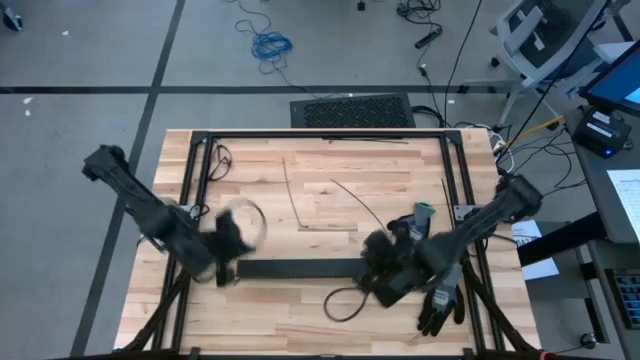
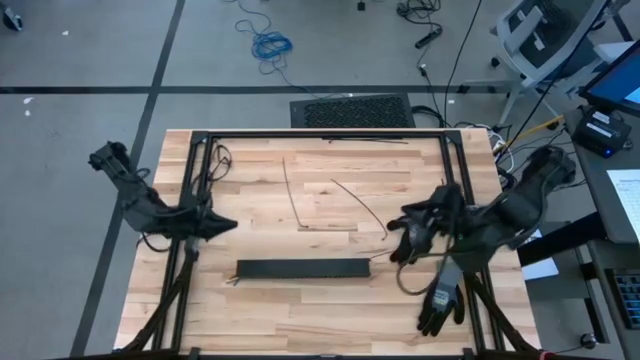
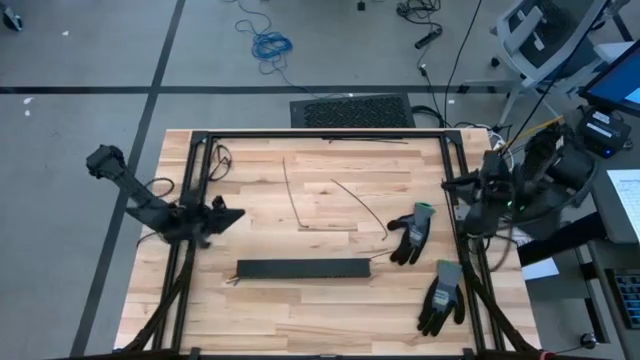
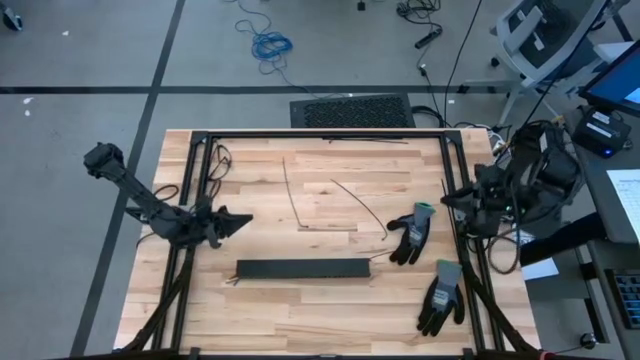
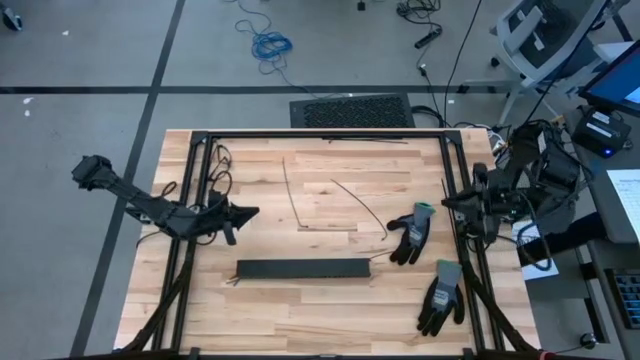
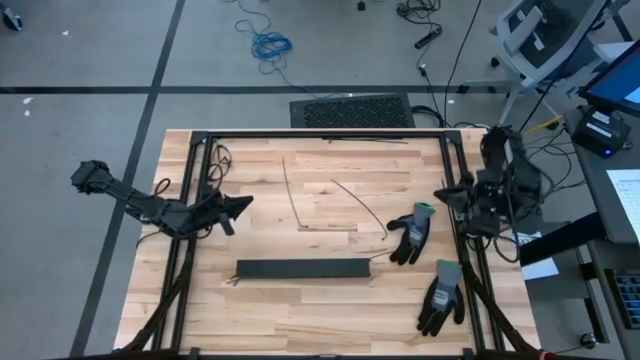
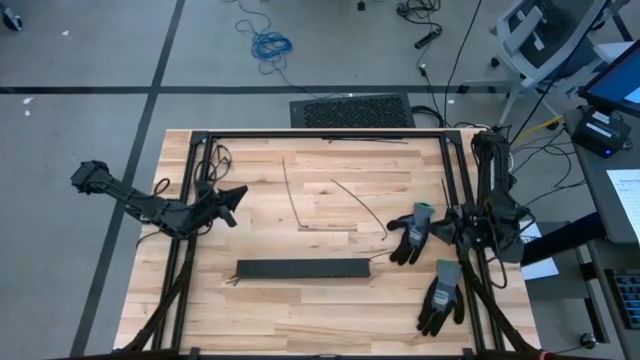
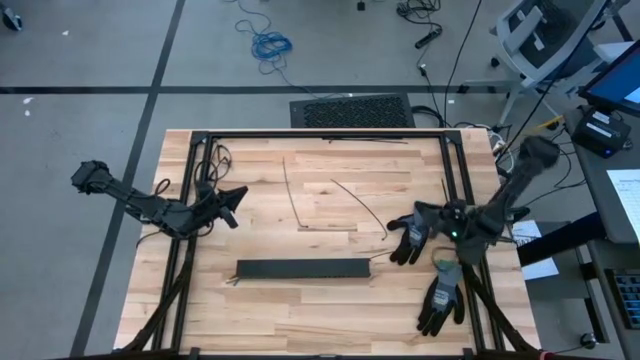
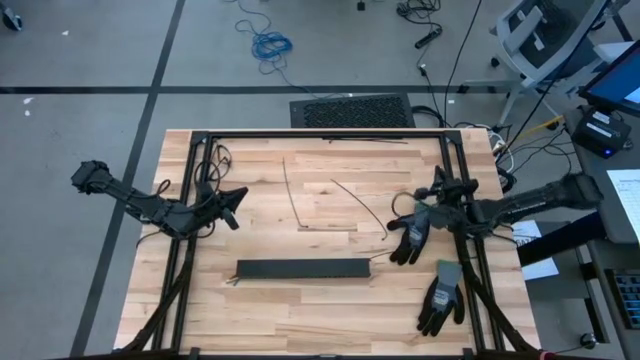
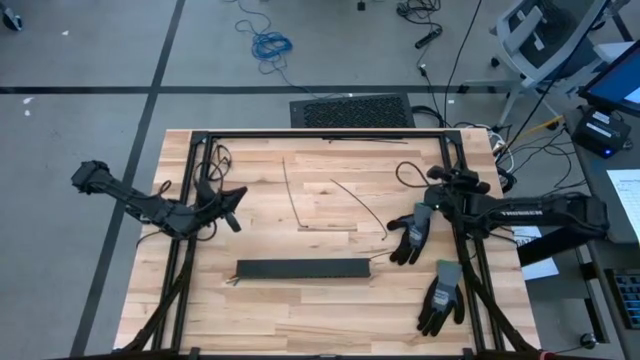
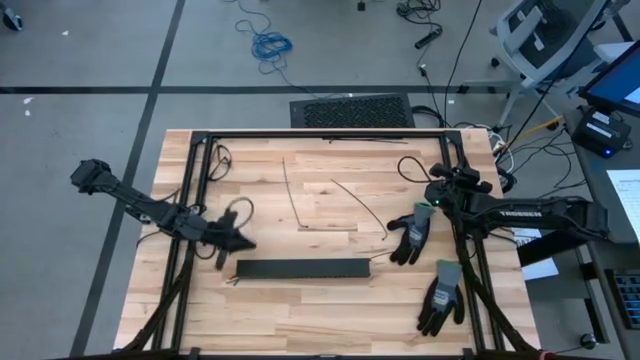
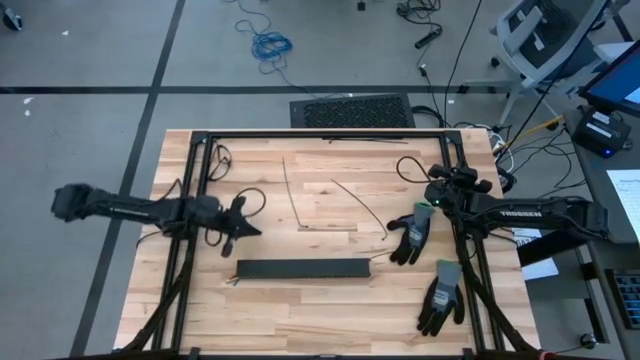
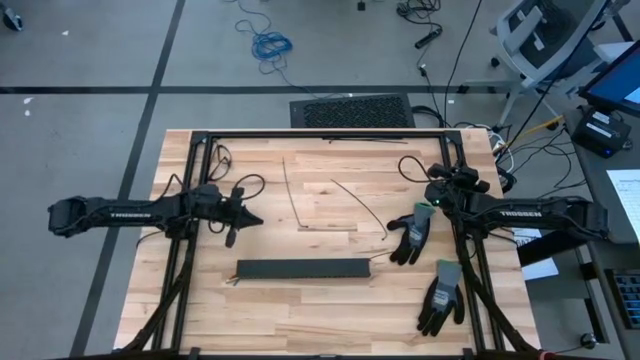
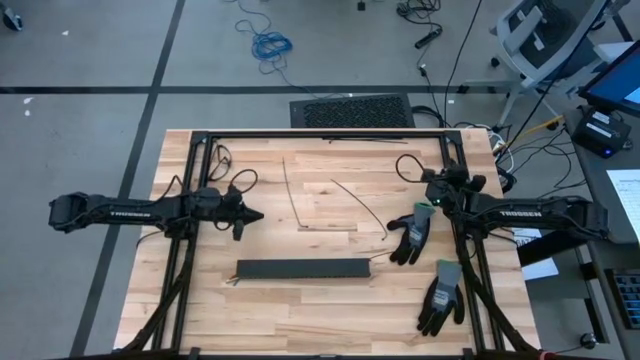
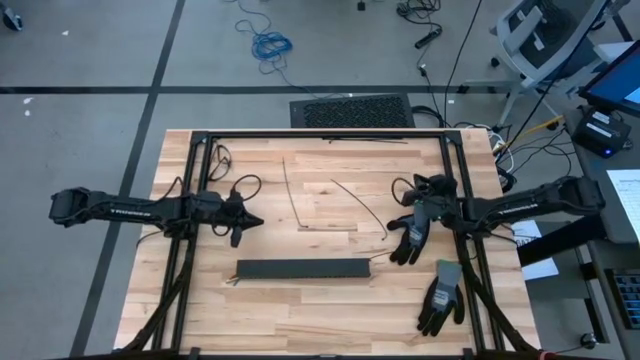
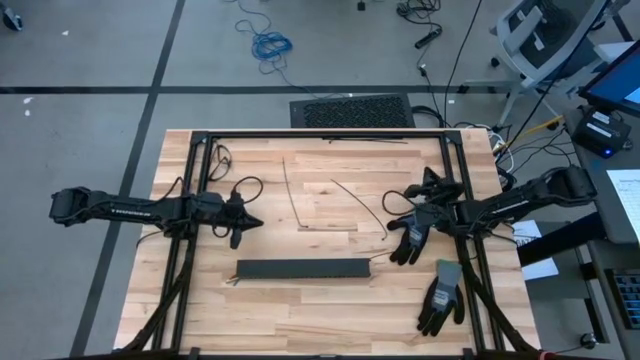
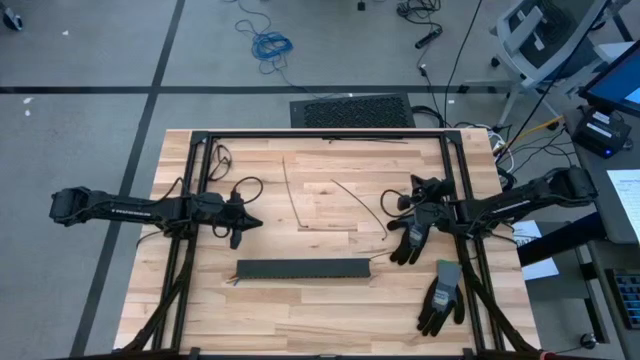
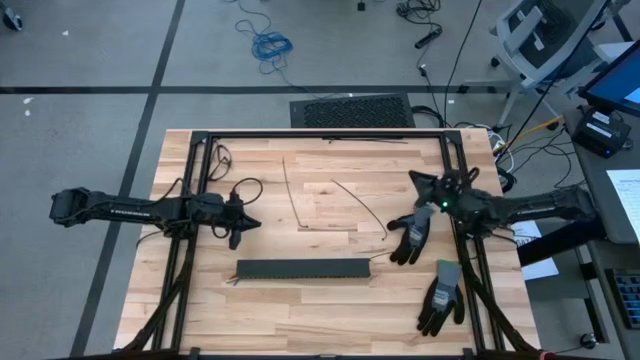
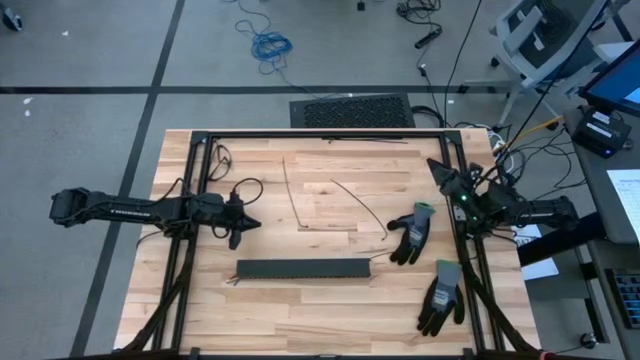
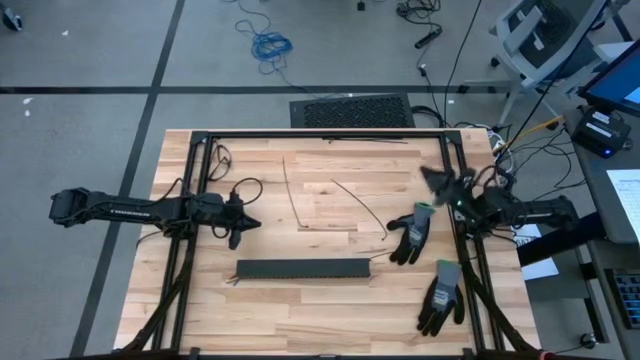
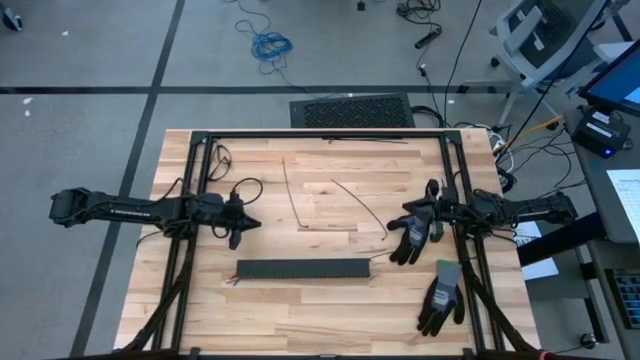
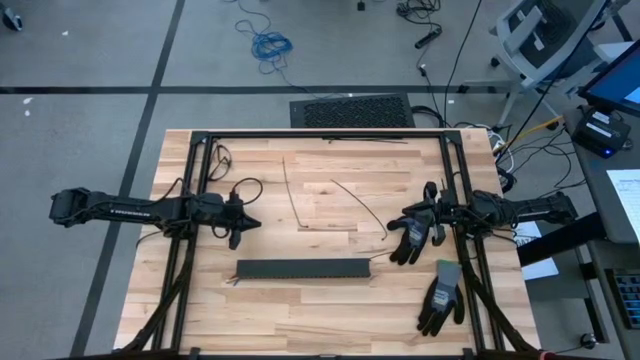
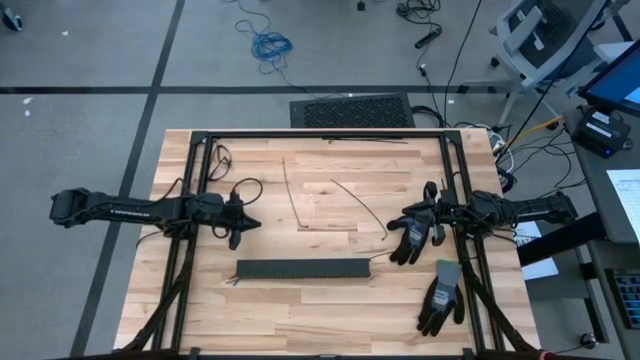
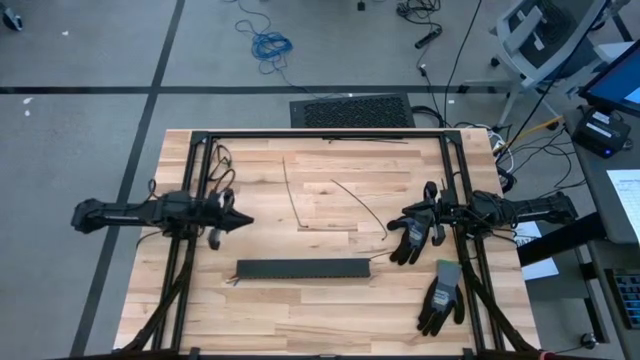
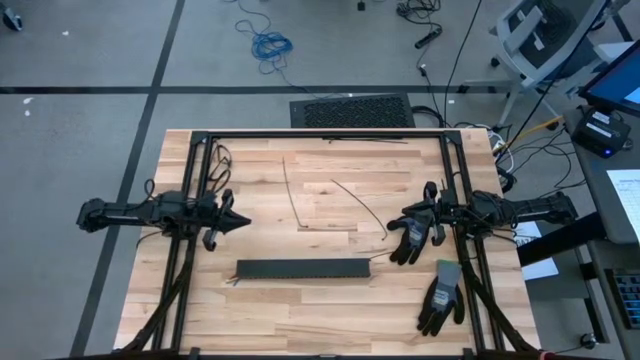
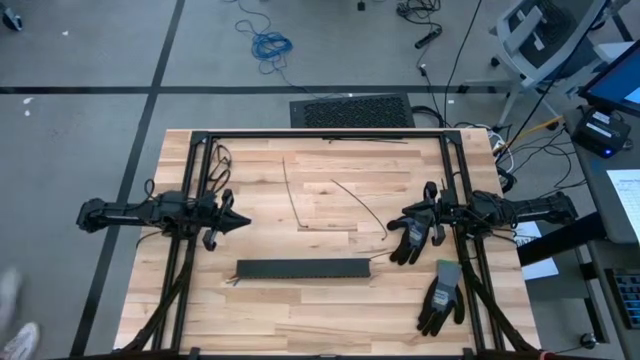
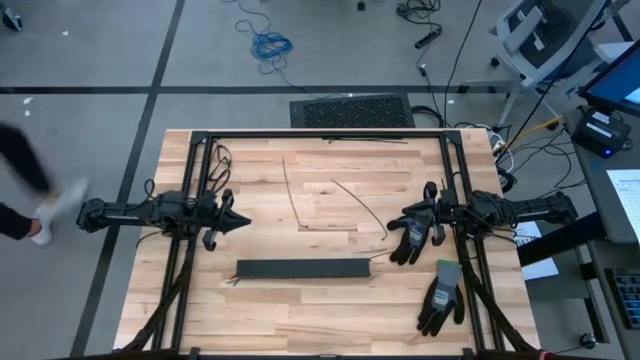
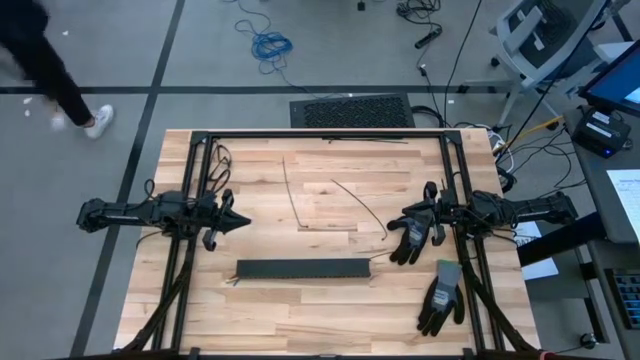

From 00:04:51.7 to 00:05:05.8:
Task: Ziptie cables
Return to Home Position

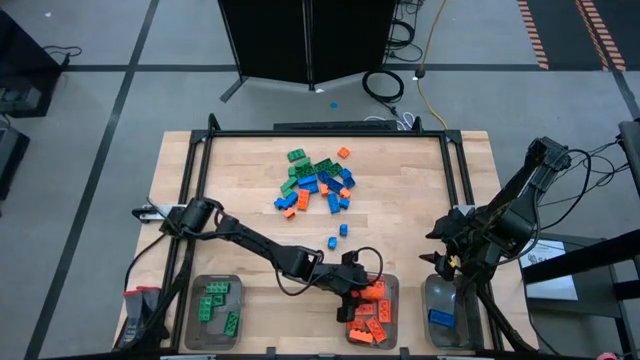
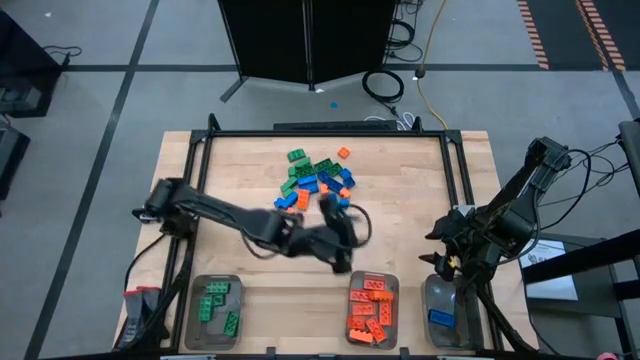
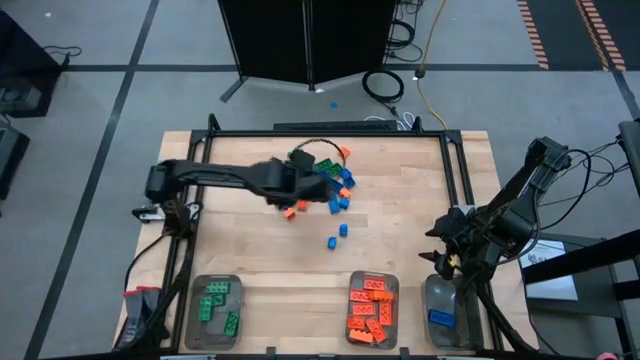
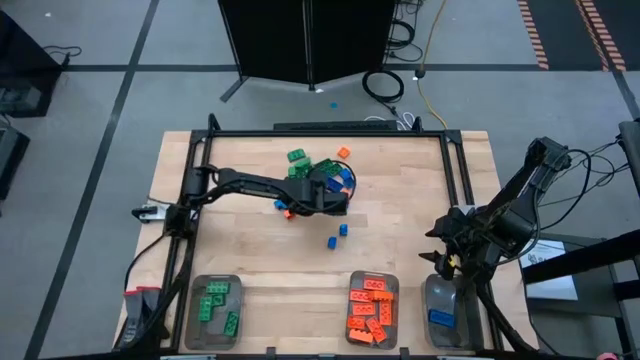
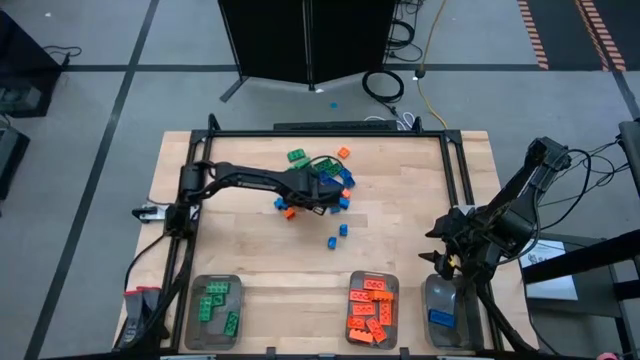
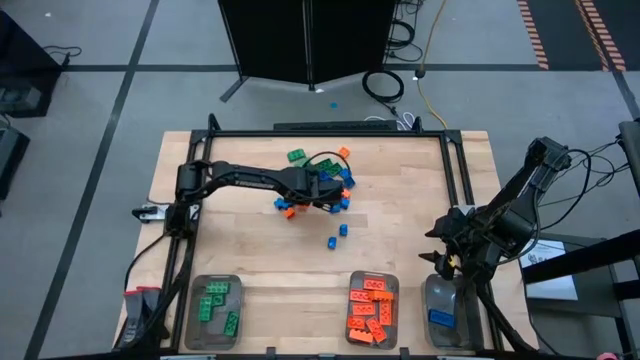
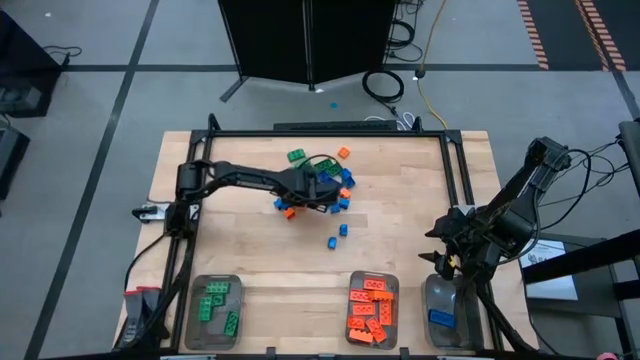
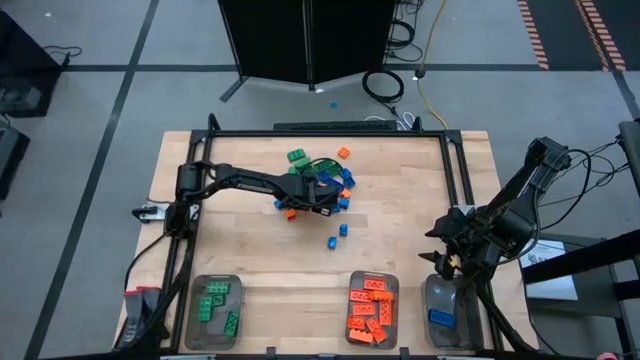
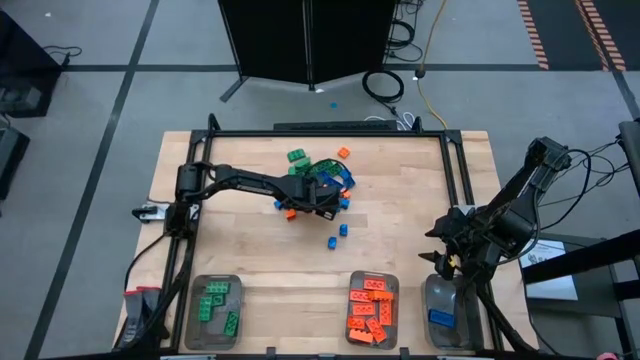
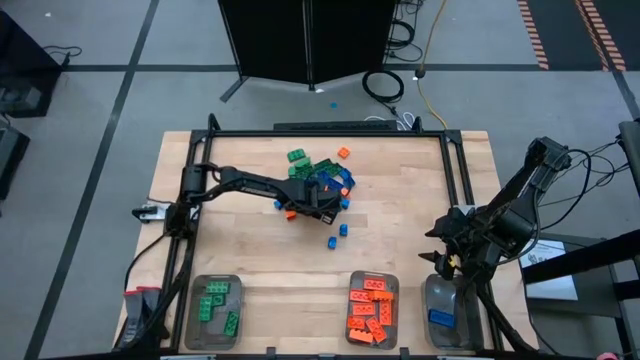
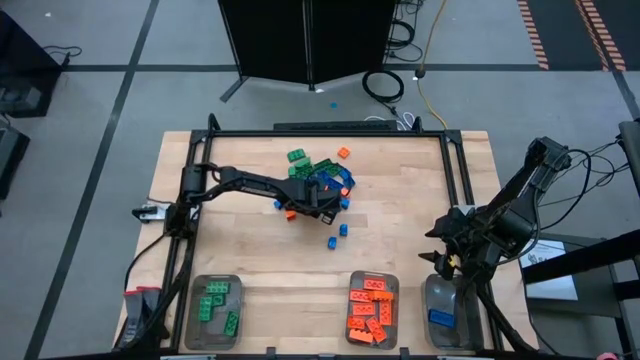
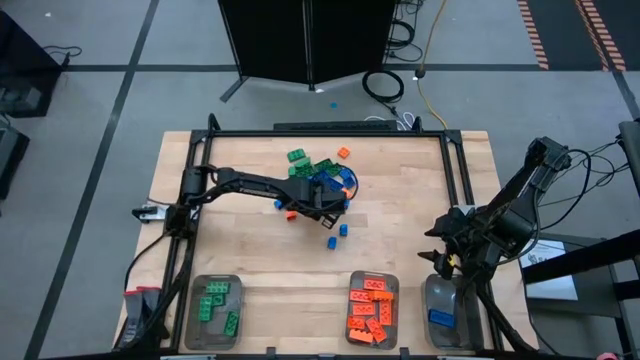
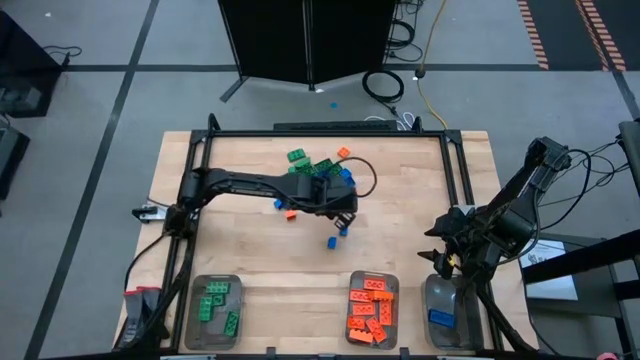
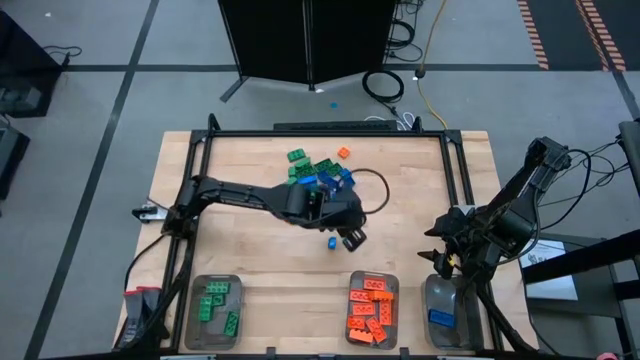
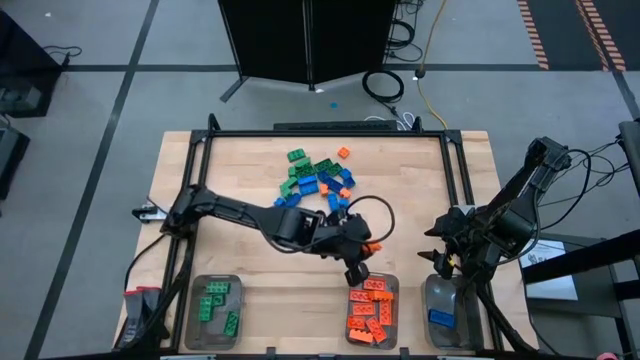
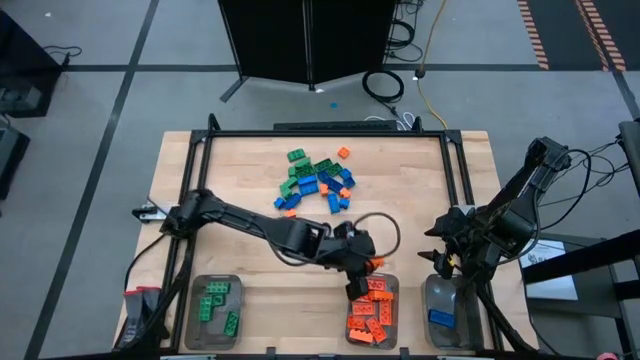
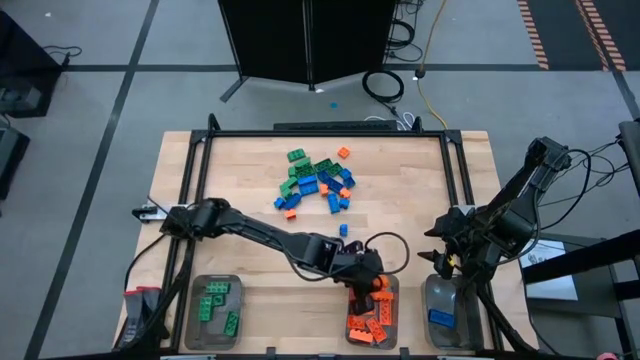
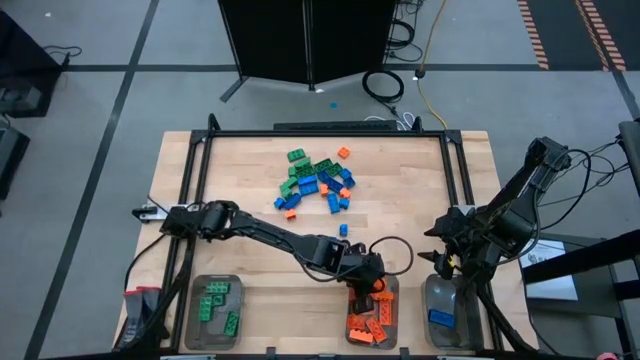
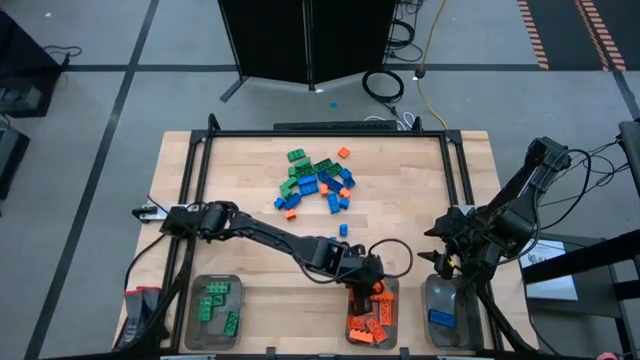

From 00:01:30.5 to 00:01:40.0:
Task: Sort blocks
Put the orange game piece into the center black bin
